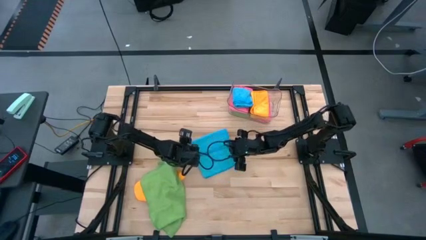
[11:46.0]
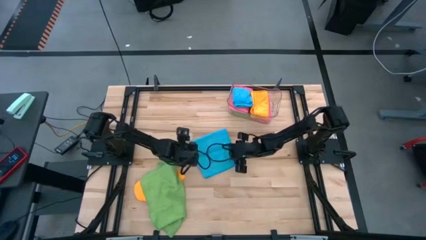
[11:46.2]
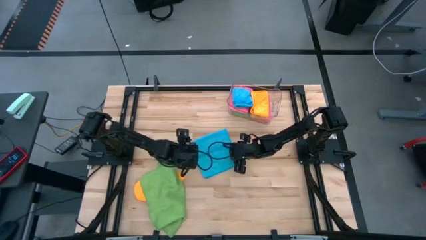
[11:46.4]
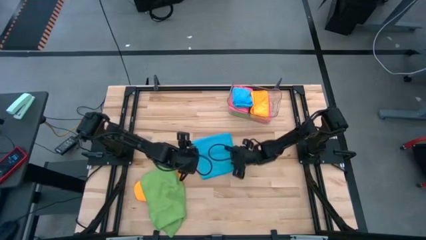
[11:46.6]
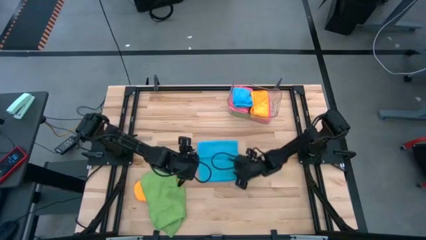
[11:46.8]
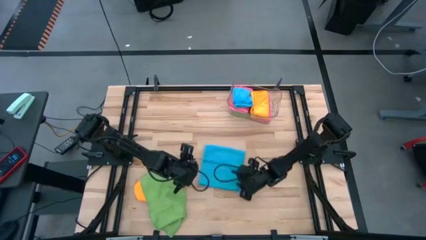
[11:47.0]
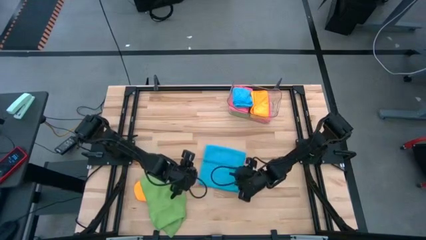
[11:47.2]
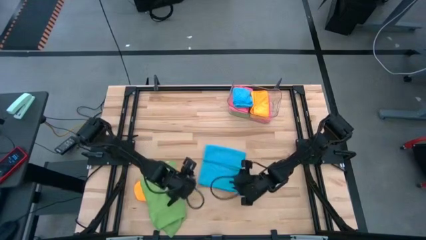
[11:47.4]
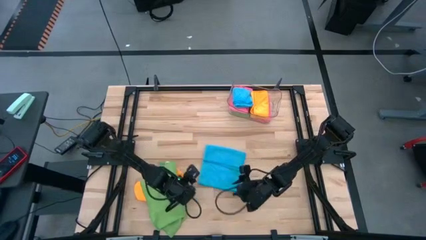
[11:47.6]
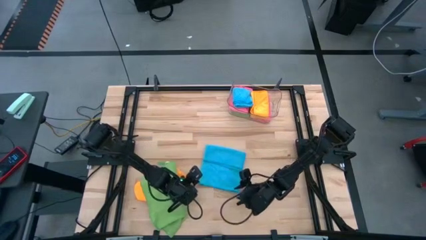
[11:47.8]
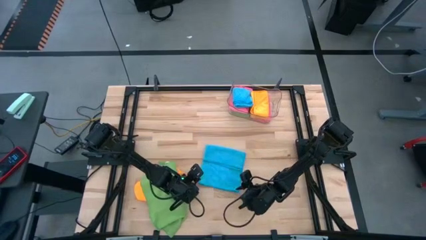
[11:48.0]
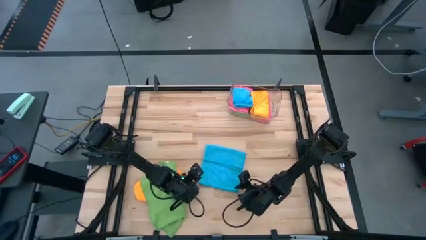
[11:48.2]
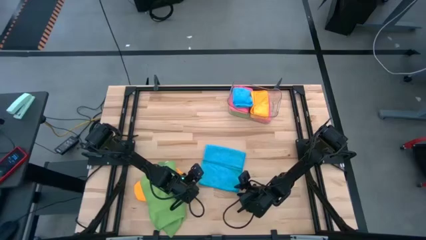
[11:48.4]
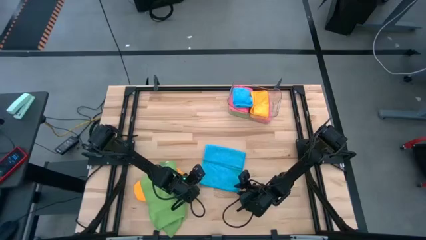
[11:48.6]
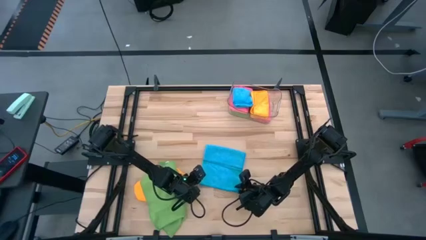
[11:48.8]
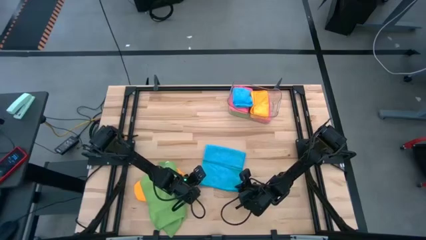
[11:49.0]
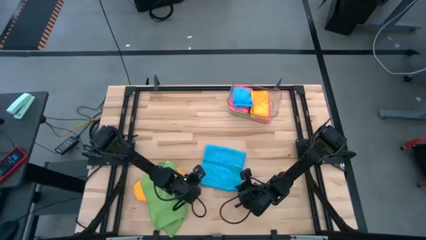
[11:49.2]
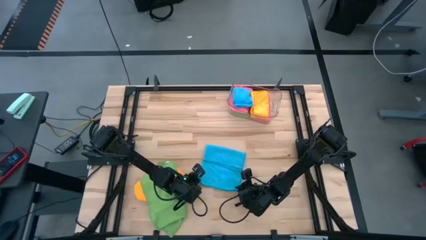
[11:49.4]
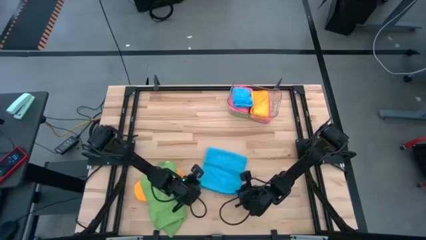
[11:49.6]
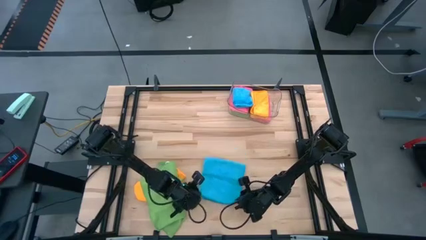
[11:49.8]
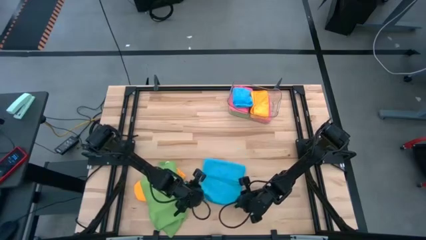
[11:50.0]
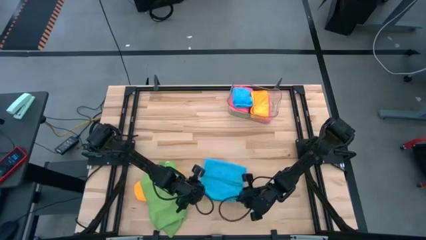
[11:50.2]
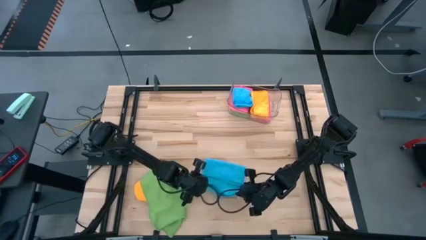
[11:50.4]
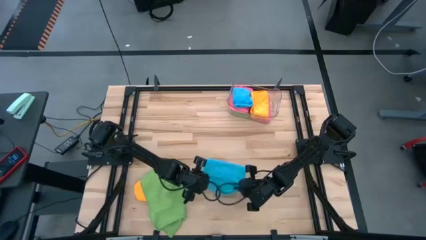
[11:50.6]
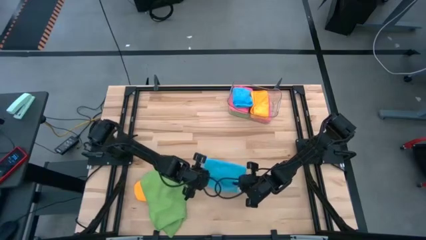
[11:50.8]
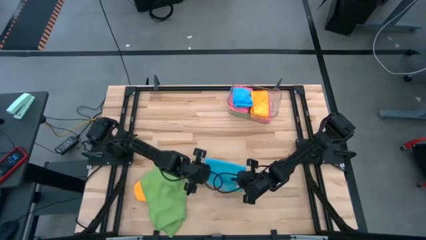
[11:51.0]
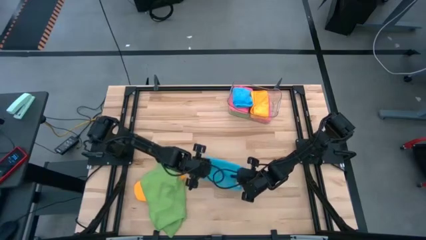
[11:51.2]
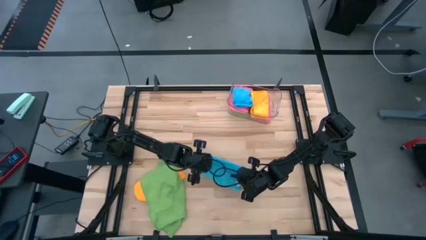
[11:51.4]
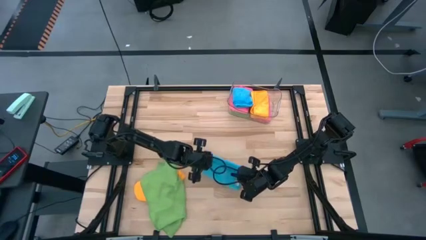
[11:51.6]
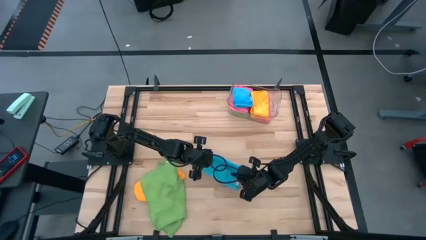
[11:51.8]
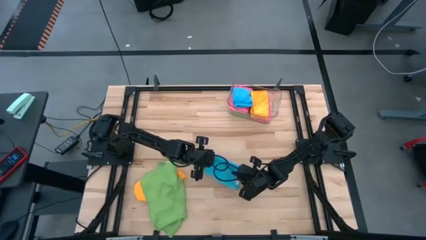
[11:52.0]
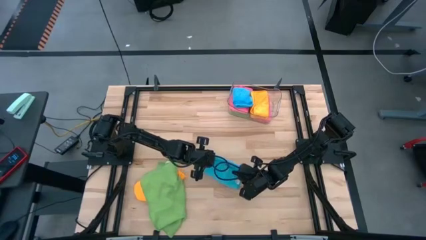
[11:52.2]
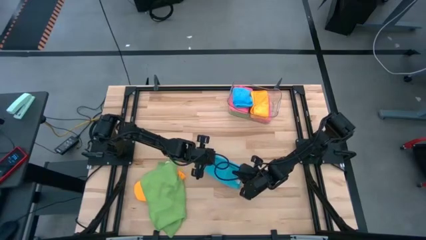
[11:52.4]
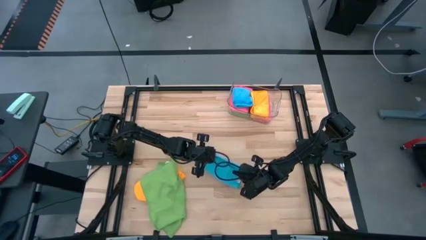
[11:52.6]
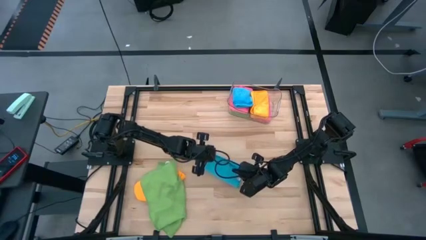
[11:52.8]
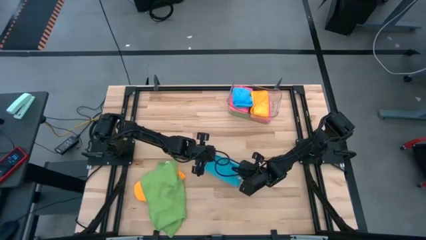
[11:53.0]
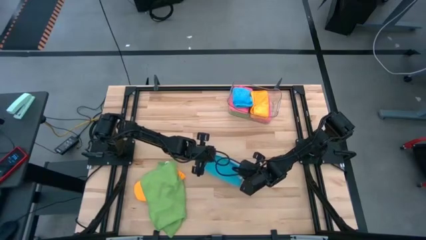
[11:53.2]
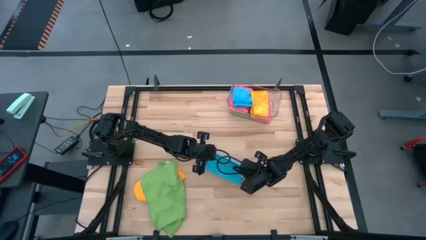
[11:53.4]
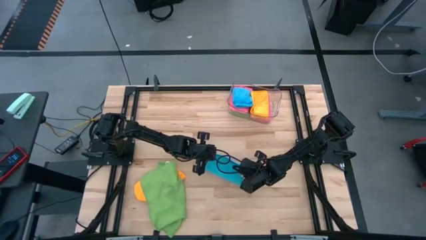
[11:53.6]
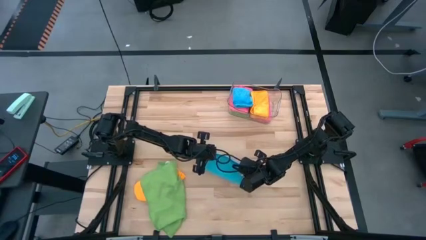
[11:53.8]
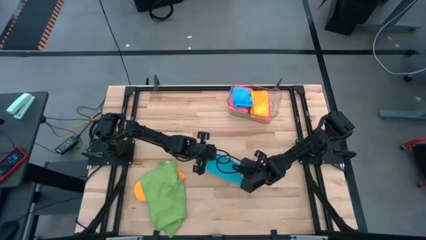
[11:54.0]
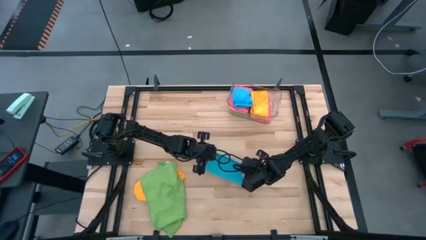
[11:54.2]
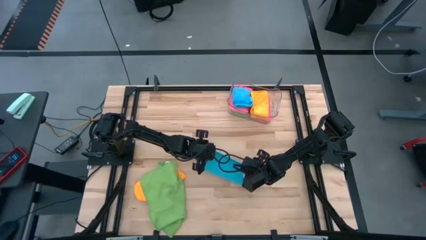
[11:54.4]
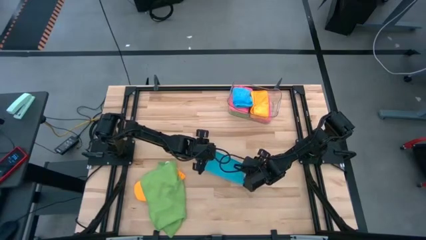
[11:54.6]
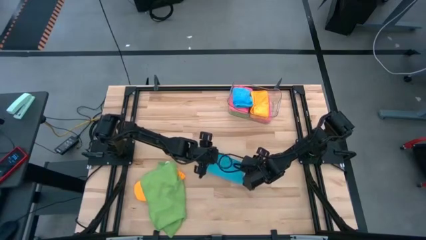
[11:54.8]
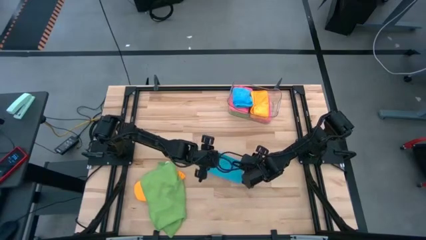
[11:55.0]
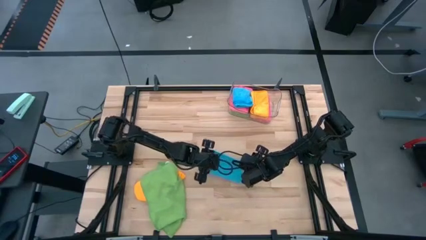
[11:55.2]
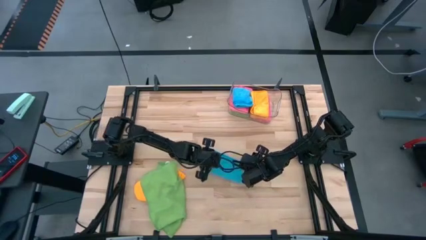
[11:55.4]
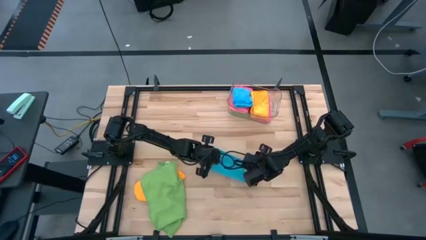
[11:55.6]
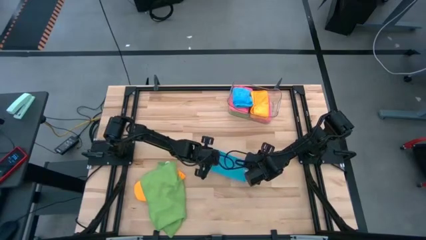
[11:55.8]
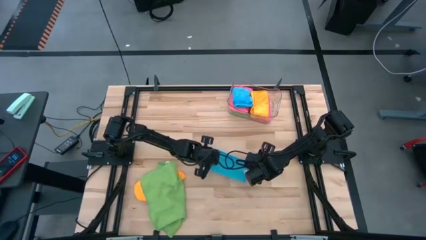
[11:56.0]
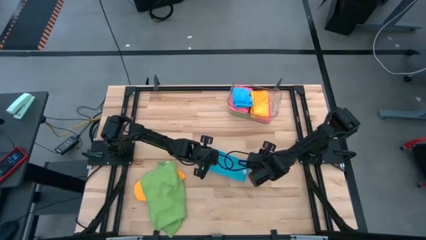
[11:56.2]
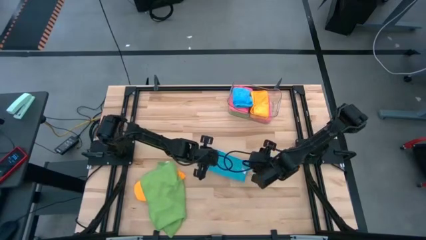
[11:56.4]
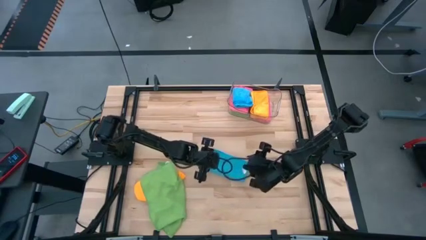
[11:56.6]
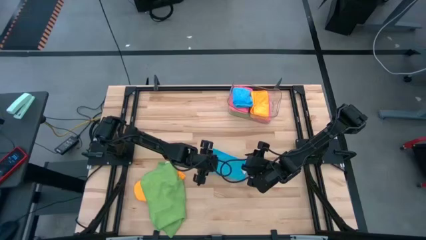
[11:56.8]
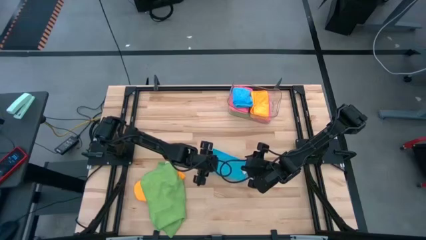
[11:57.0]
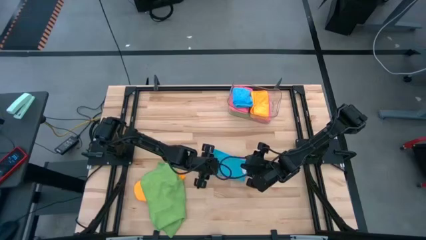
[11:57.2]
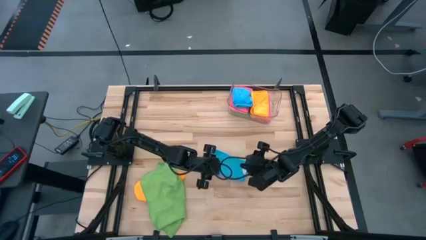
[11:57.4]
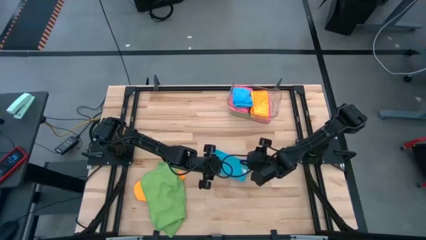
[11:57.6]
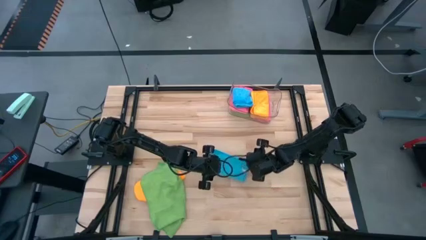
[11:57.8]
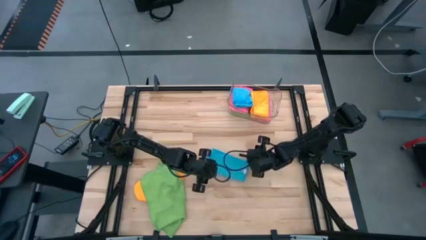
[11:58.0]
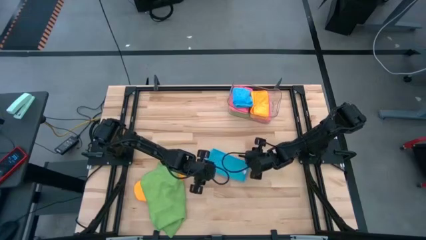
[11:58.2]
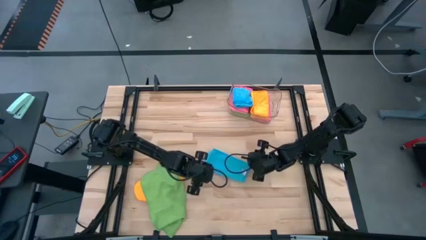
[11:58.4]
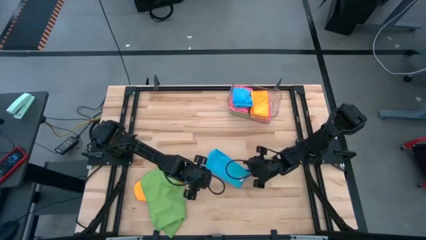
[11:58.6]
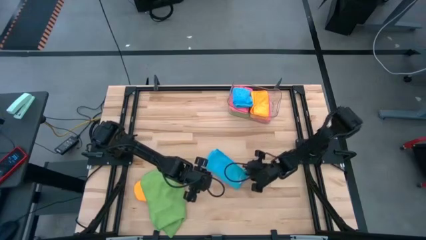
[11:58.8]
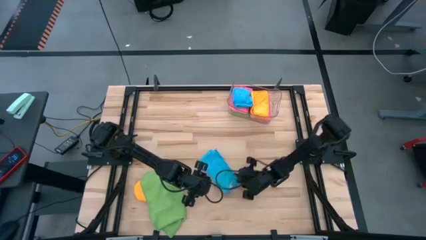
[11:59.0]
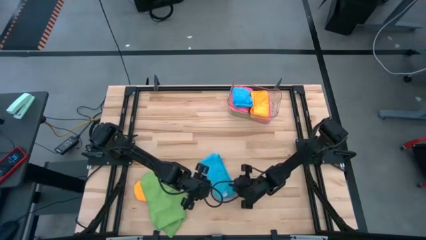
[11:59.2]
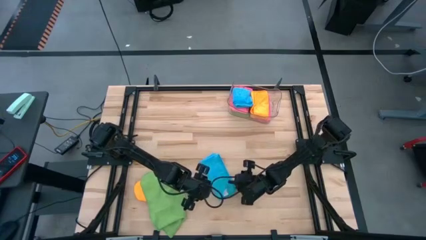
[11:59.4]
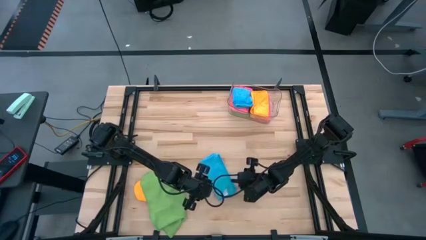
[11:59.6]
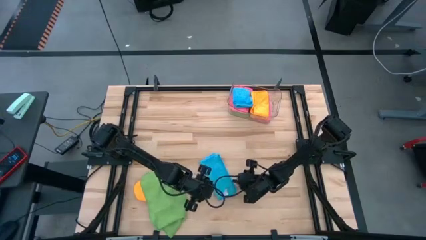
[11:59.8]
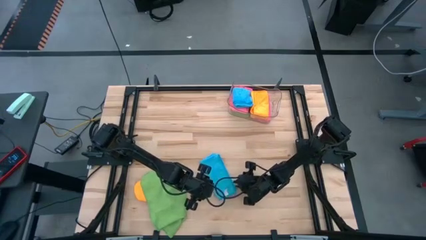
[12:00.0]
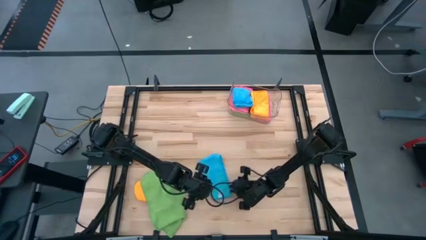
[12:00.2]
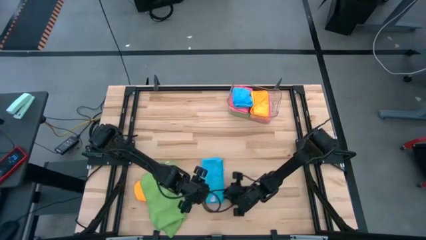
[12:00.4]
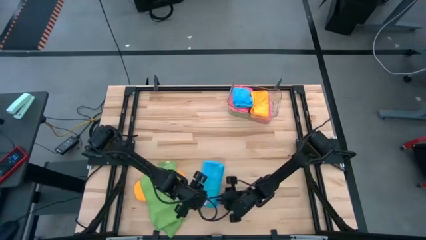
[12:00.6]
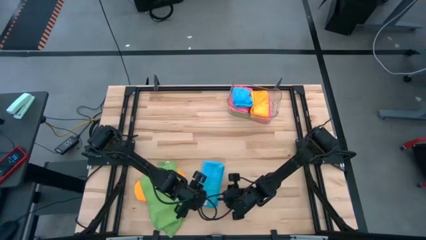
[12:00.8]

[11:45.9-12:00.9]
Task: Fold microfiber towels
Fold the blue towel
